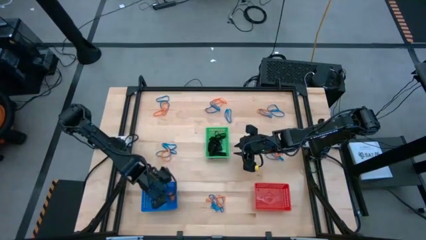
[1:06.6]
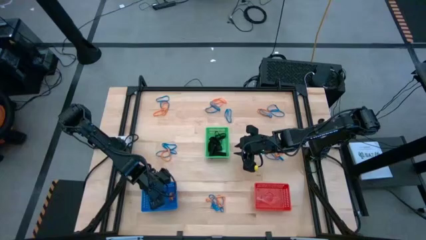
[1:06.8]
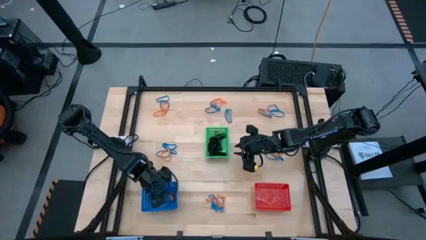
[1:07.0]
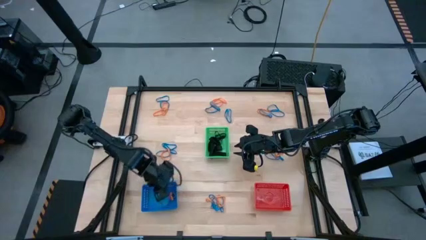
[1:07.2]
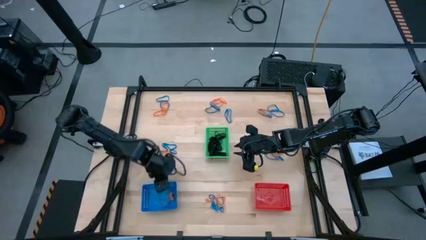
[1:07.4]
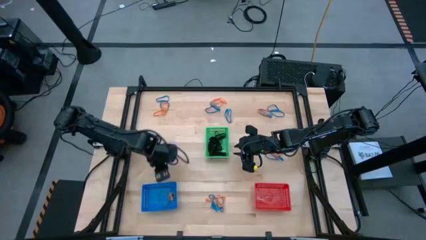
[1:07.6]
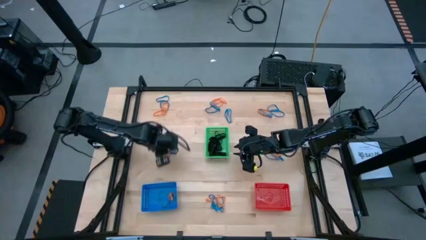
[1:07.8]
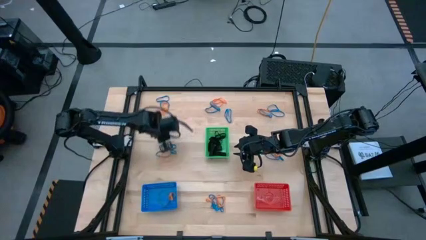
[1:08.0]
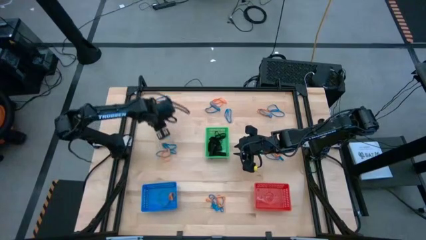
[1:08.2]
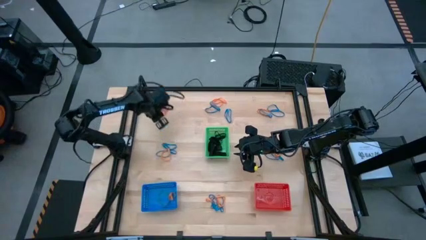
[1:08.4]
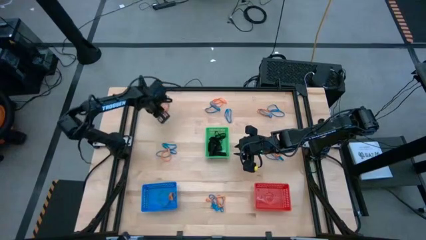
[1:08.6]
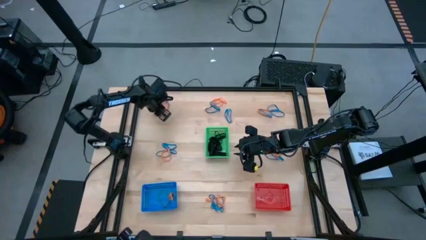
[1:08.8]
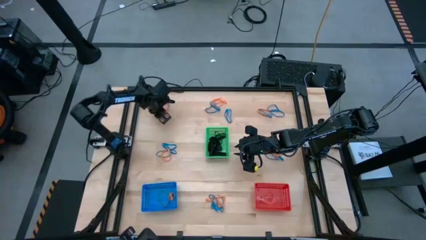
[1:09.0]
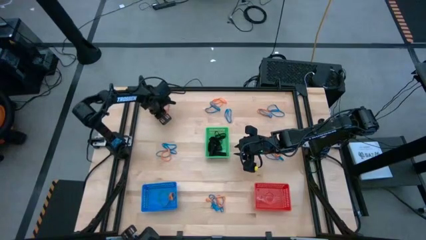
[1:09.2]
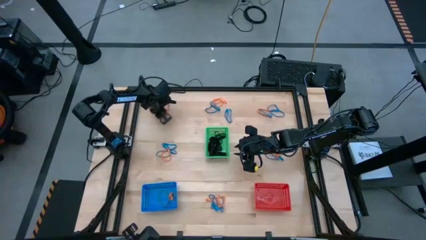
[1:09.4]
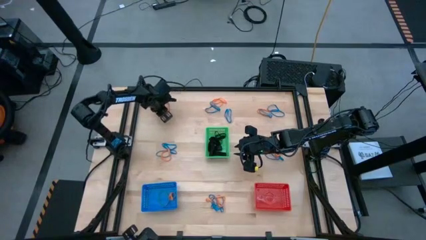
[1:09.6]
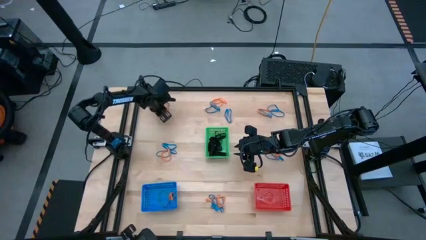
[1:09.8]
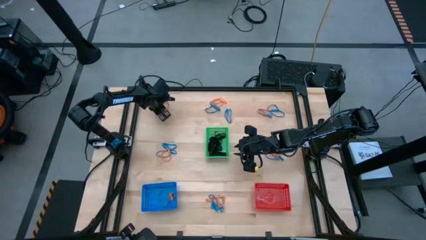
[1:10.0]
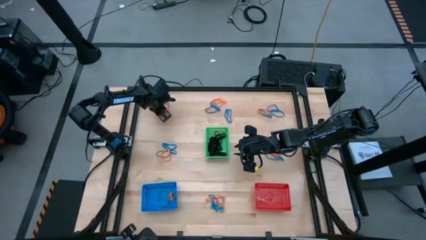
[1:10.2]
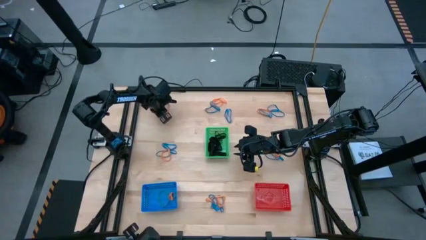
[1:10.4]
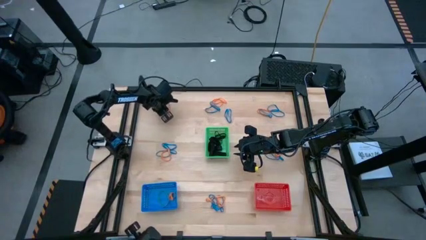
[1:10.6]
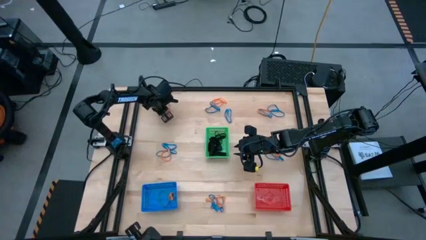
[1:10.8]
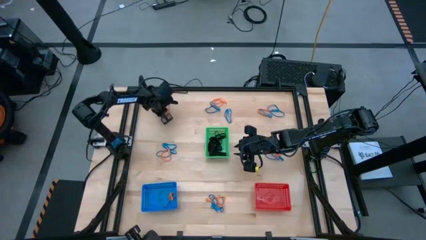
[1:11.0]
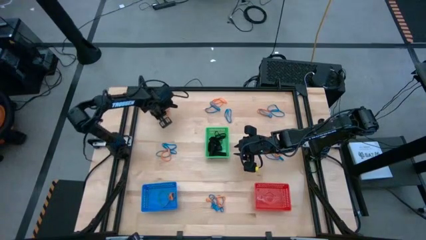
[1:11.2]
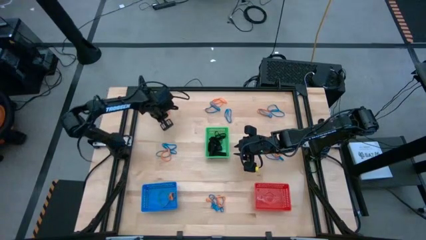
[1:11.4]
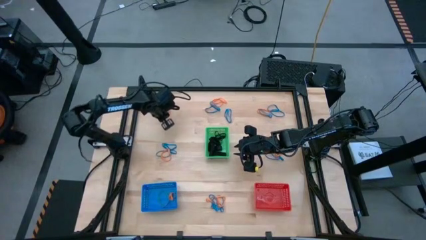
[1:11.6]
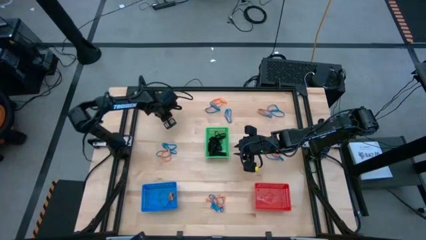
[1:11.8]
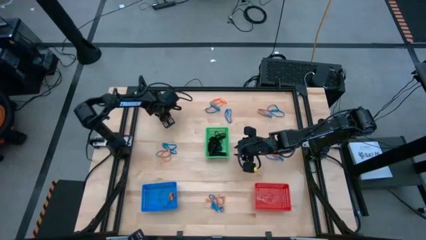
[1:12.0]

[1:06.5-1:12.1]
Task: Sort rubber bands into baskets
Put the orange rubber band into the blue bin

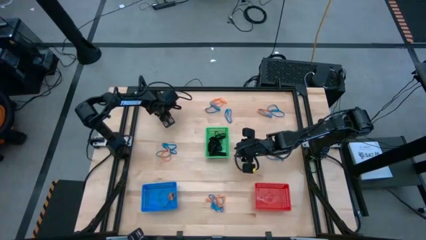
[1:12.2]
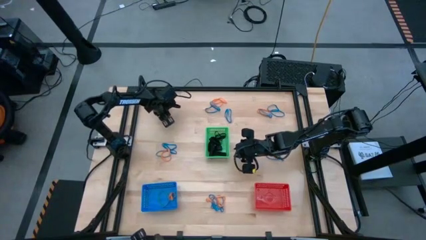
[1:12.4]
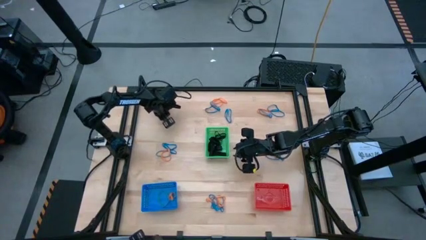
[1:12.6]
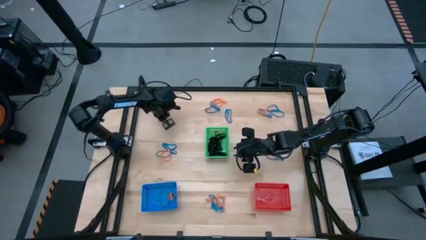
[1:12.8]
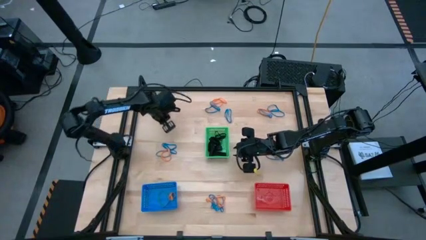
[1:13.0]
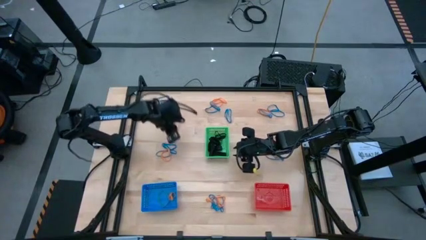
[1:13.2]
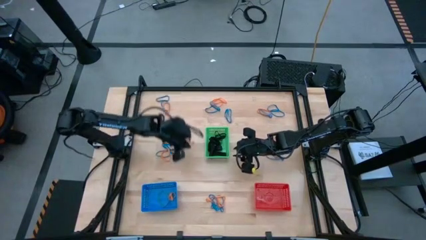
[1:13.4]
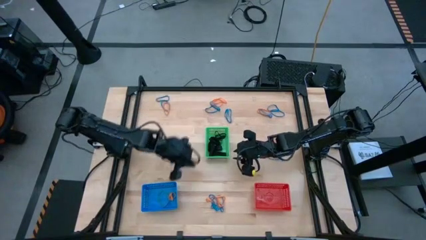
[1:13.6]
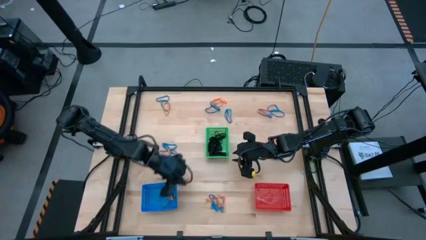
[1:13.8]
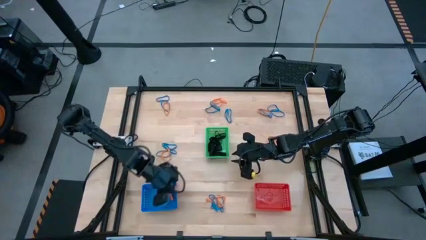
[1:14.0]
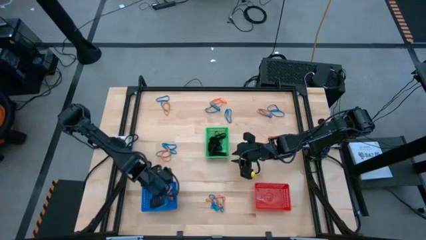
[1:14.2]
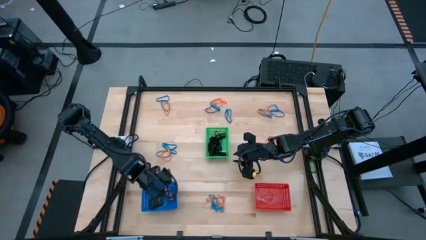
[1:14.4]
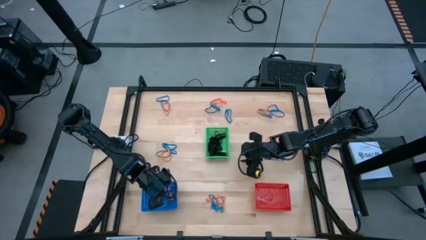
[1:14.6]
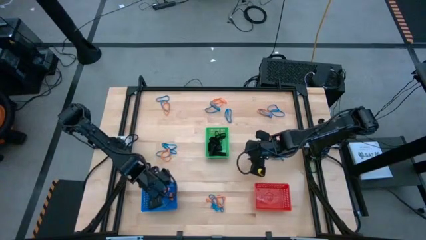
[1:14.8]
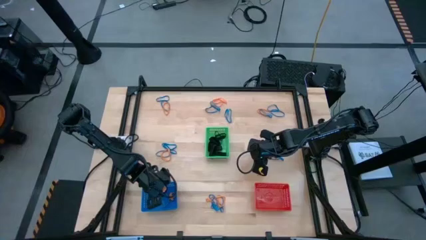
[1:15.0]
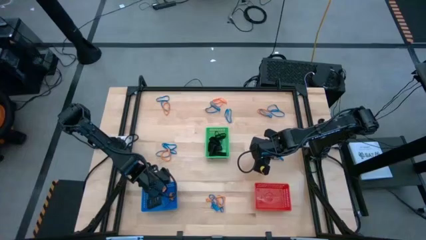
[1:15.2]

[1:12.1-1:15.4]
Put the orange rubber band into the blue bin

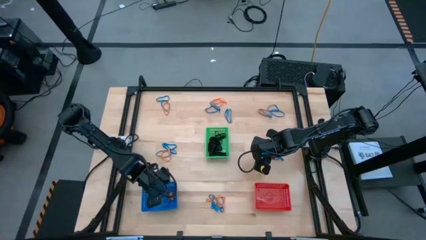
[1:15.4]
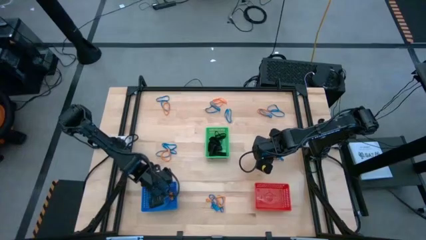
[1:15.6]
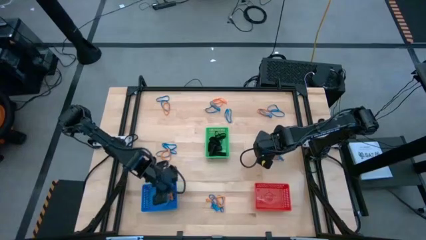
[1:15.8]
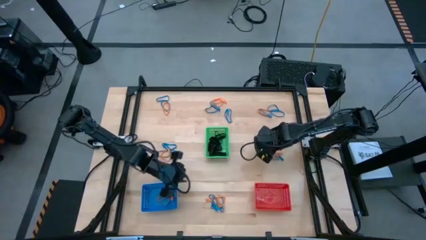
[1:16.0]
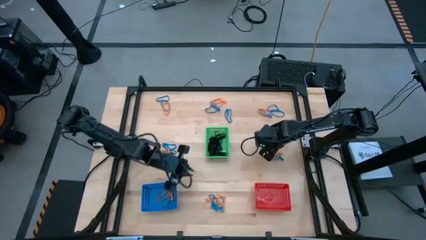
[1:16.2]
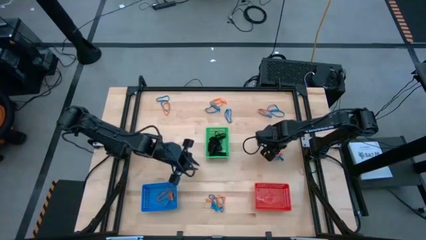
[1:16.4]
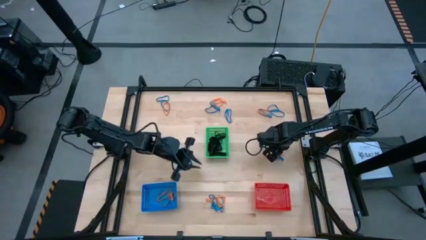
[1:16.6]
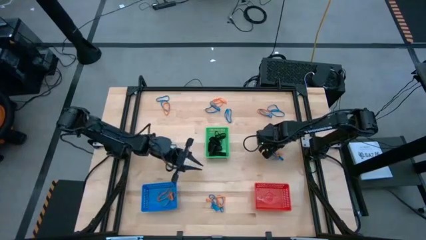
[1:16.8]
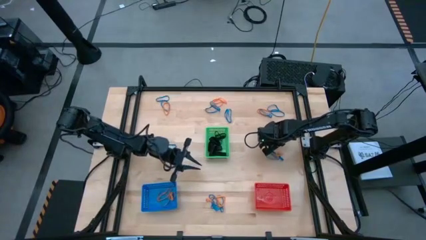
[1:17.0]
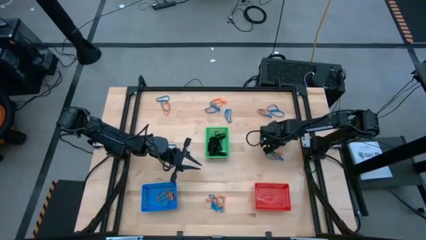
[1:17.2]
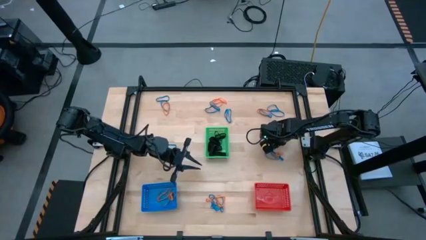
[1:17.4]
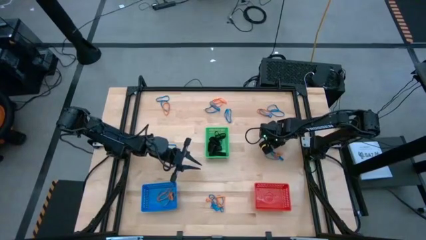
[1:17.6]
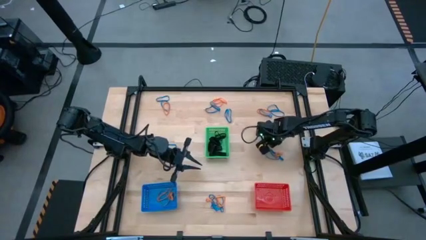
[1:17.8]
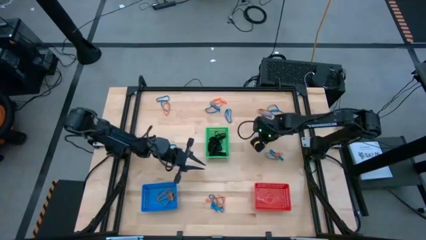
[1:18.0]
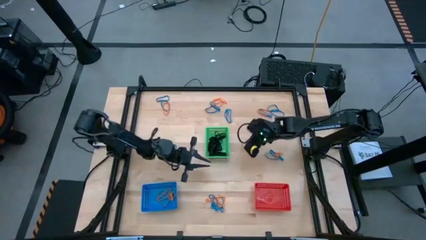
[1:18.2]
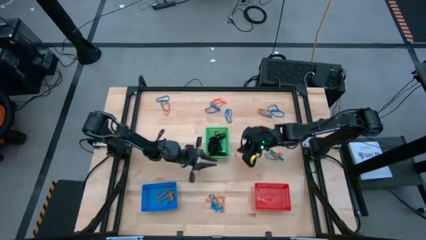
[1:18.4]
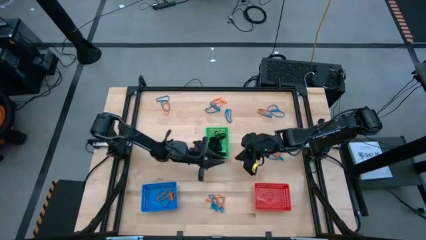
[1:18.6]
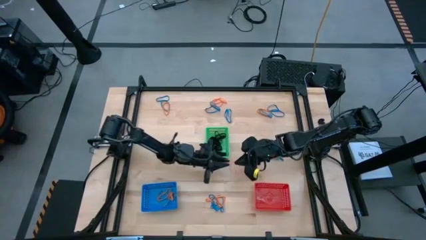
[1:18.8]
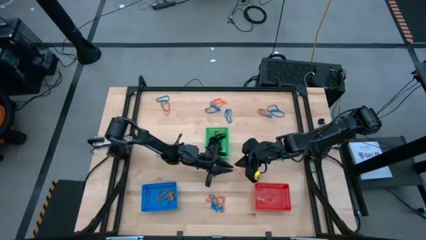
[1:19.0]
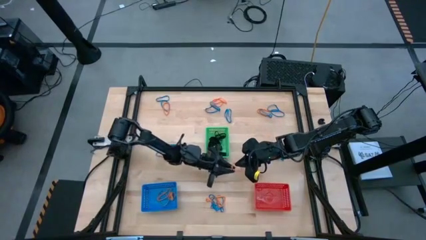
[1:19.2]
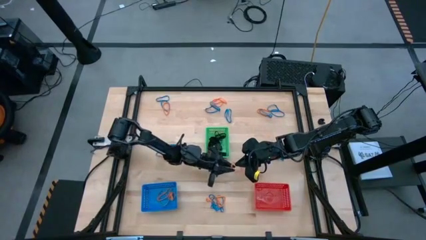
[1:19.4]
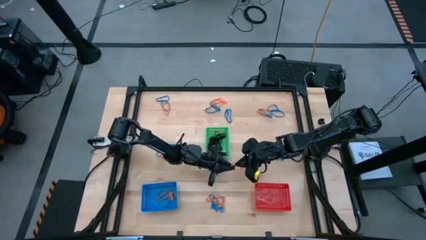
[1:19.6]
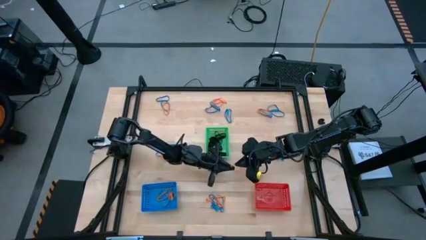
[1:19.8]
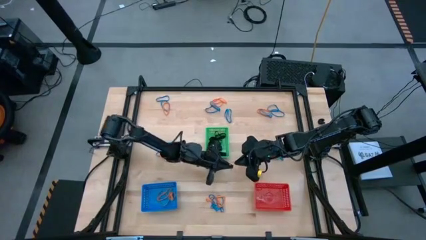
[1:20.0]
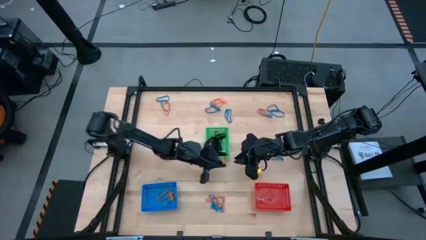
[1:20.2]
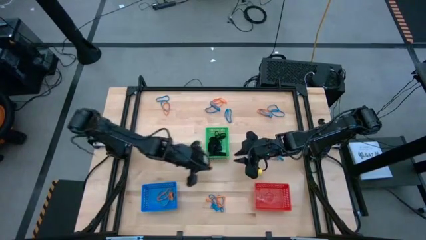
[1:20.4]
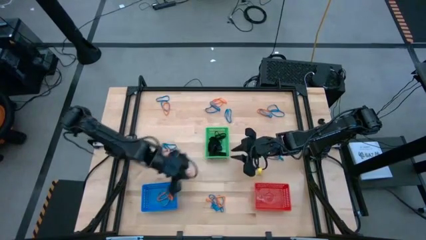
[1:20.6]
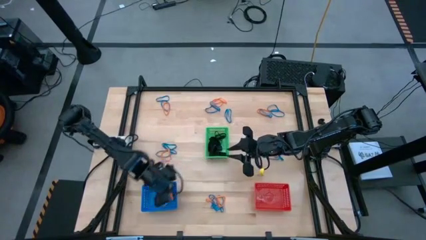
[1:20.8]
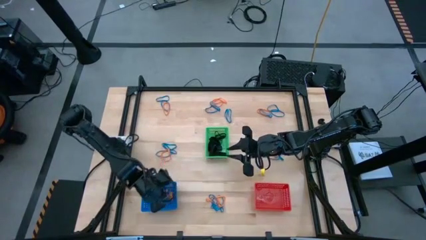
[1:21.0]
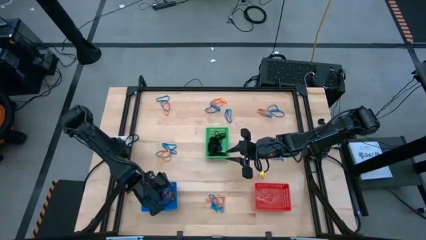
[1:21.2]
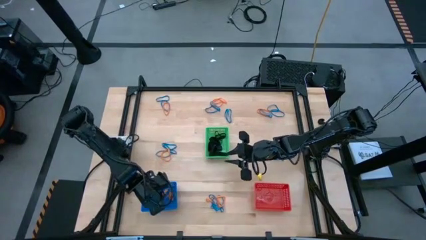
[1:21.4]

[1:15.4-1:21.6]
Put the orange rubber band into the blue bin

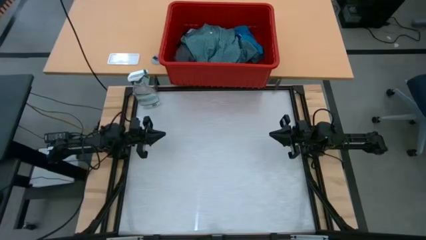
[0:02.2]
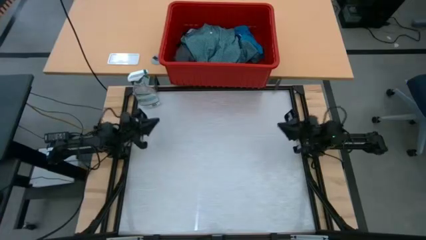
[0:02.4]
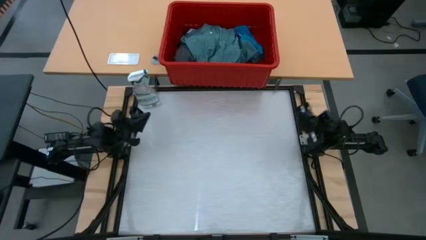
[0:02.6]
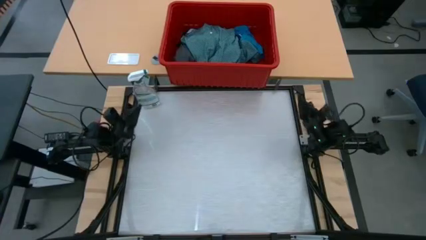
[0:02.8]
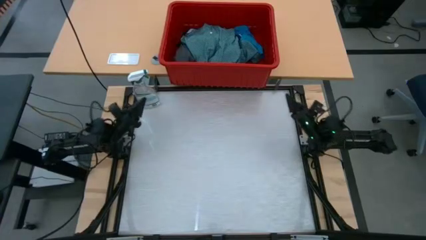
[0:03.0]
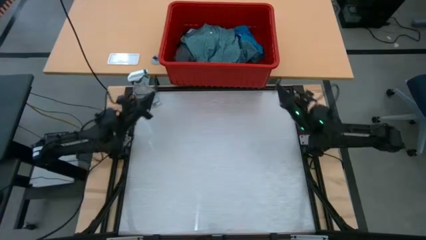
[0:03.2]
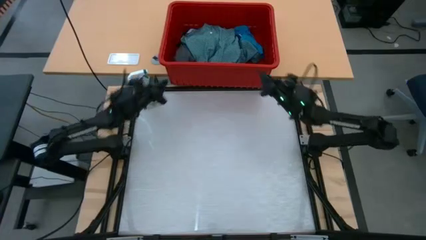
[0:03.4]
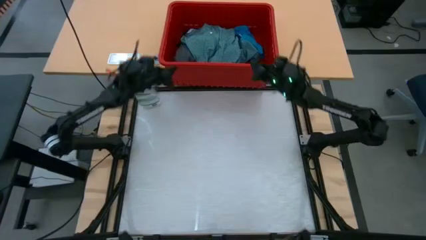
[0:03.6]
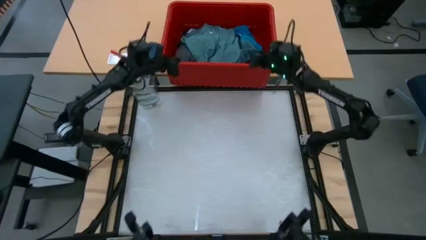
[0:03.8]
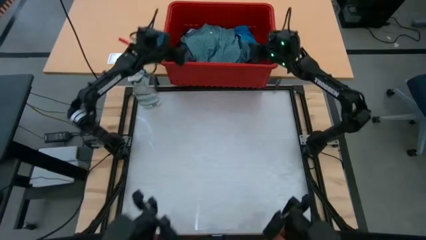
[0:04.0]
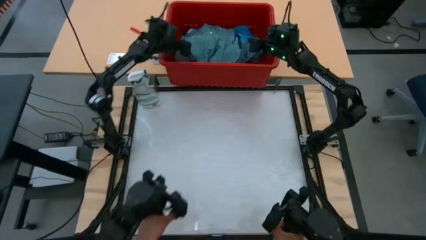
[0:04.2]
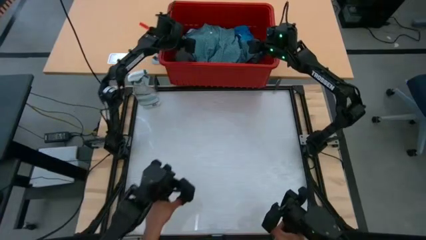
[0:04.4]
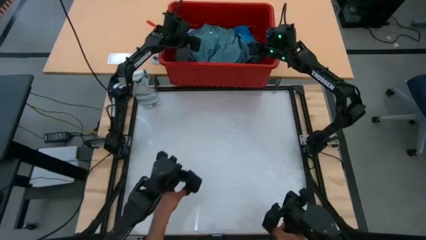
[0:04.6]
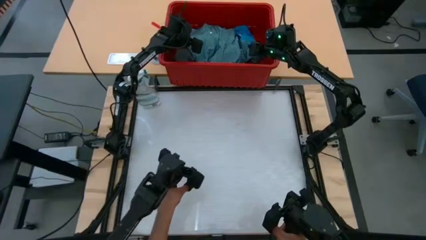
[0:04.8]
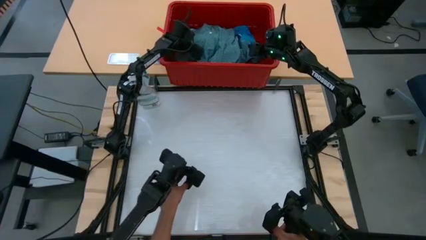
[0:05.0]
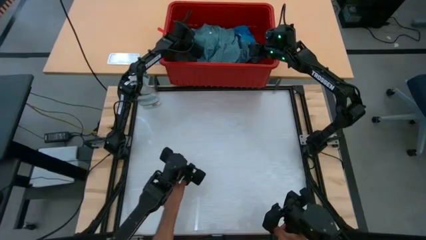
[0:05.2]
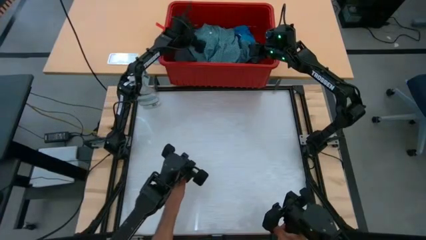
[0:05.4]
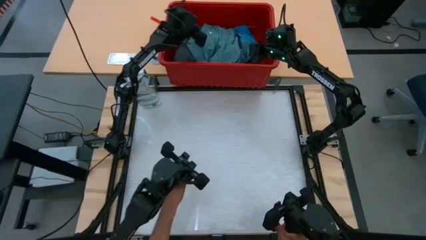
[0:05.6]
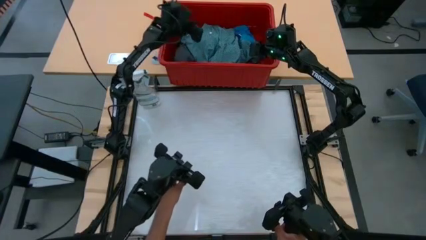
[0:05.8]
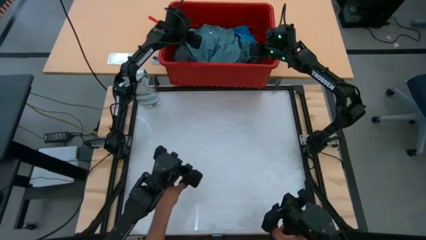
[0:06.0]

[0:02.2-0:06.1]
Task: Fold laundry
Remove the dark shirt from the red bin
